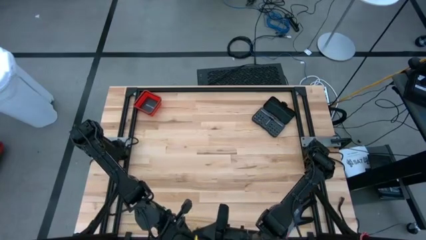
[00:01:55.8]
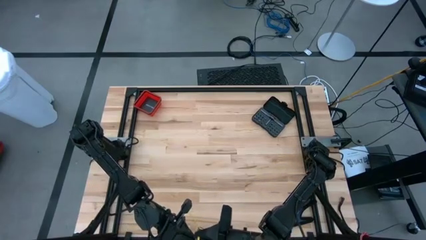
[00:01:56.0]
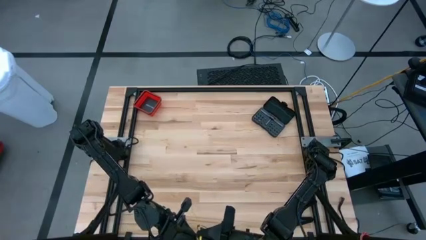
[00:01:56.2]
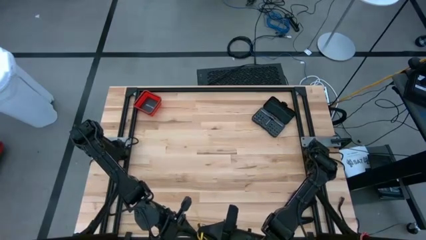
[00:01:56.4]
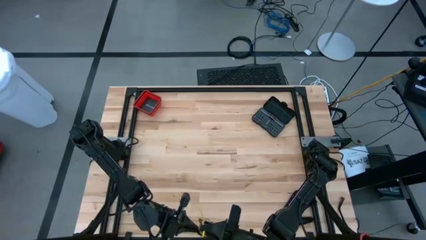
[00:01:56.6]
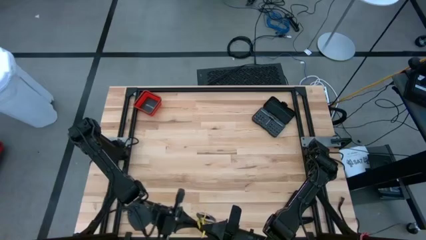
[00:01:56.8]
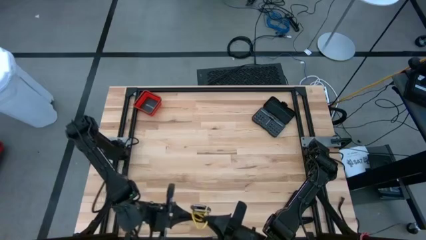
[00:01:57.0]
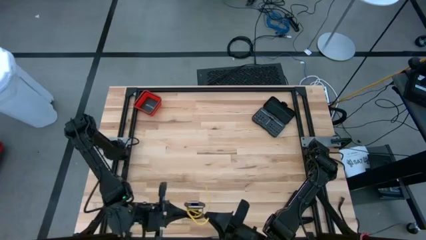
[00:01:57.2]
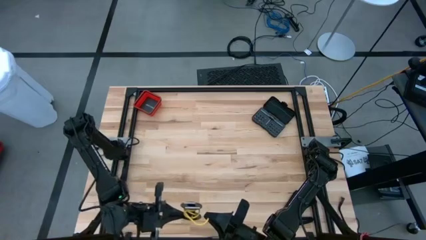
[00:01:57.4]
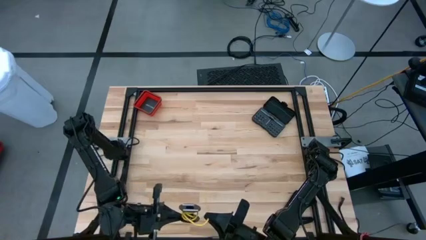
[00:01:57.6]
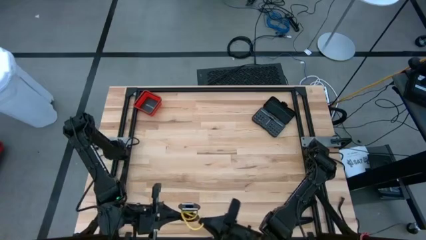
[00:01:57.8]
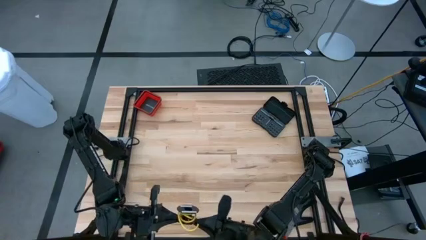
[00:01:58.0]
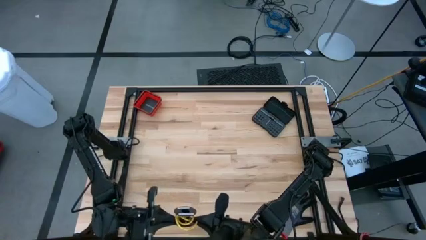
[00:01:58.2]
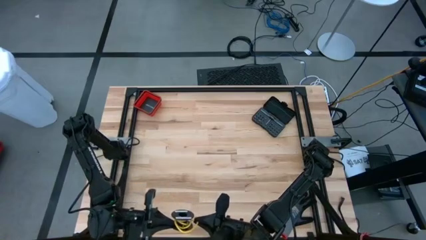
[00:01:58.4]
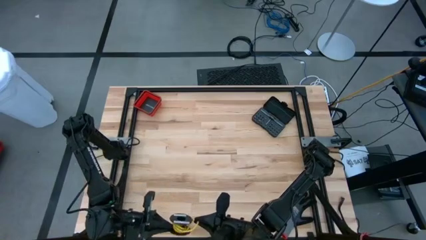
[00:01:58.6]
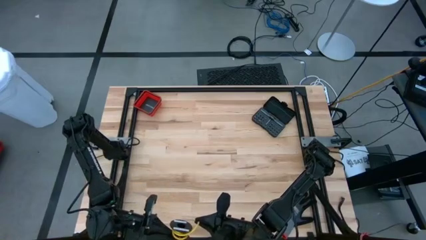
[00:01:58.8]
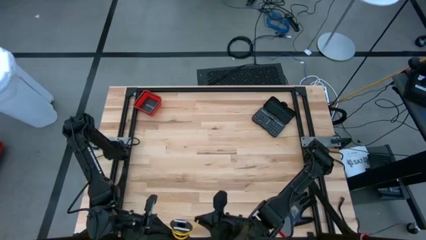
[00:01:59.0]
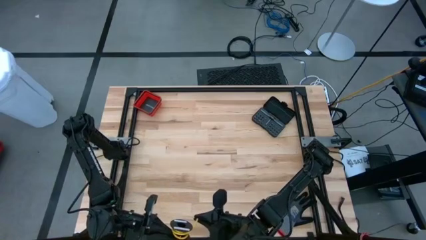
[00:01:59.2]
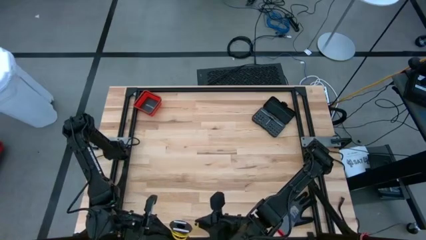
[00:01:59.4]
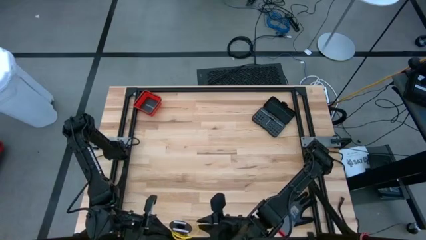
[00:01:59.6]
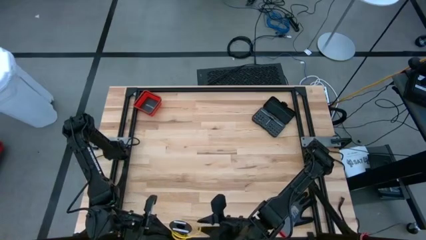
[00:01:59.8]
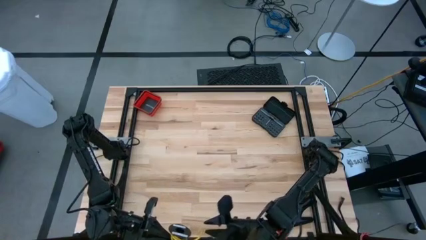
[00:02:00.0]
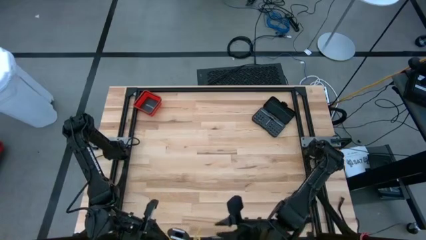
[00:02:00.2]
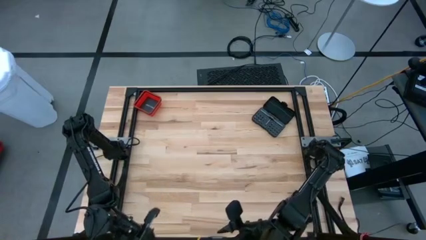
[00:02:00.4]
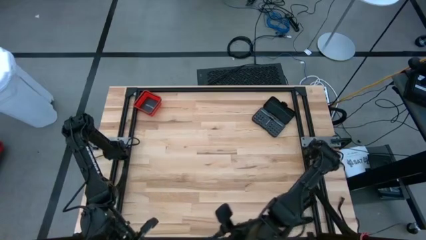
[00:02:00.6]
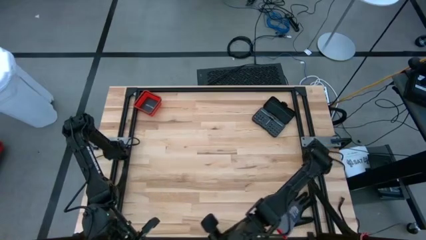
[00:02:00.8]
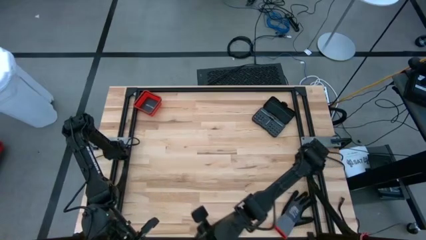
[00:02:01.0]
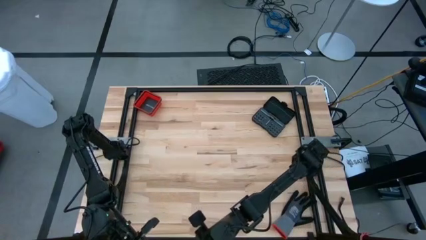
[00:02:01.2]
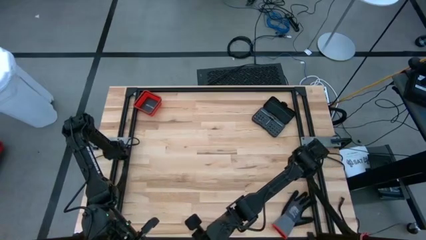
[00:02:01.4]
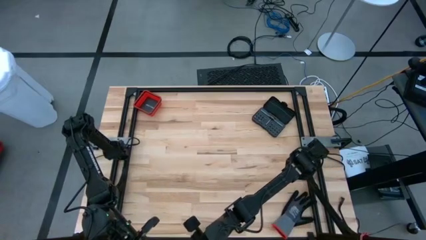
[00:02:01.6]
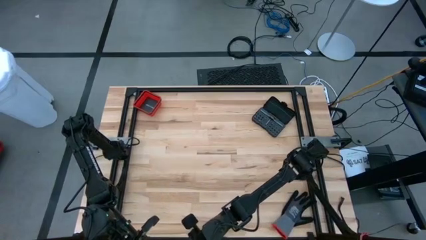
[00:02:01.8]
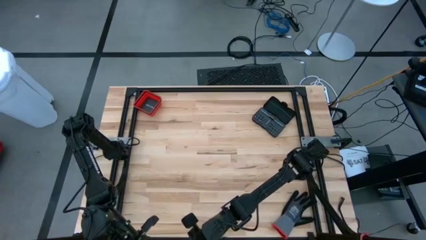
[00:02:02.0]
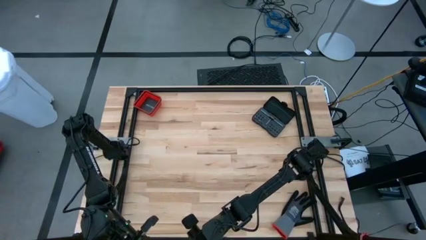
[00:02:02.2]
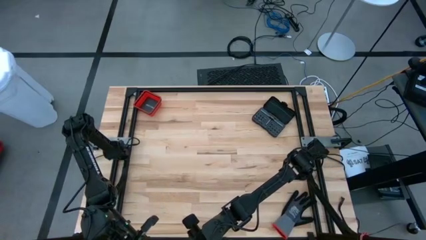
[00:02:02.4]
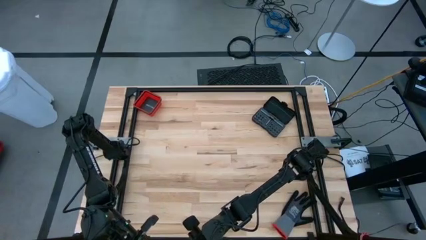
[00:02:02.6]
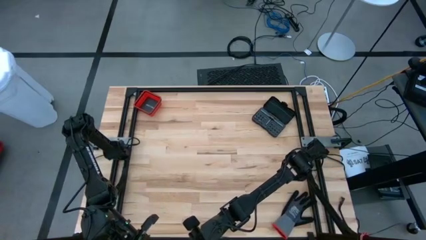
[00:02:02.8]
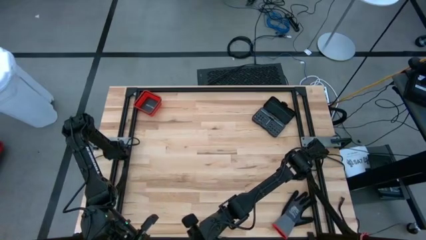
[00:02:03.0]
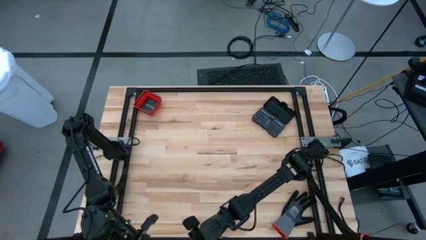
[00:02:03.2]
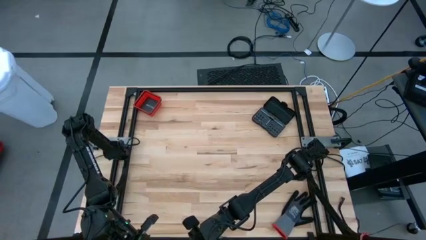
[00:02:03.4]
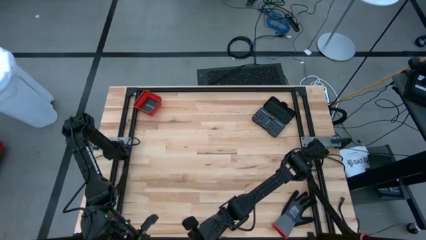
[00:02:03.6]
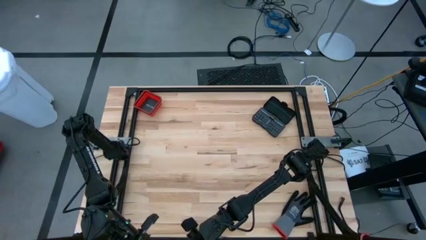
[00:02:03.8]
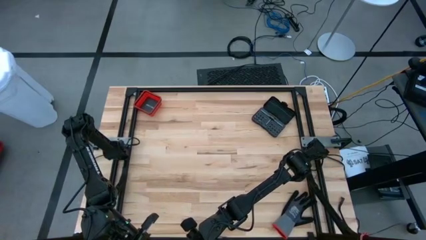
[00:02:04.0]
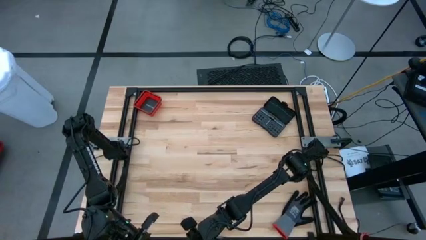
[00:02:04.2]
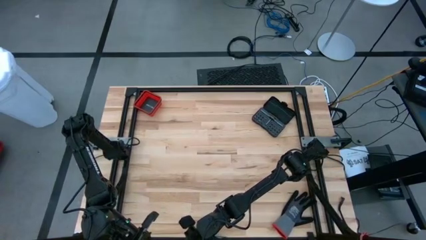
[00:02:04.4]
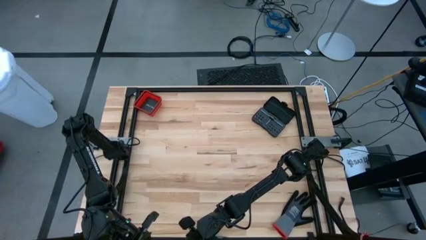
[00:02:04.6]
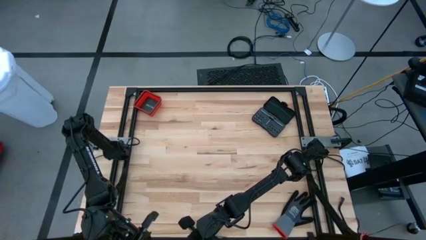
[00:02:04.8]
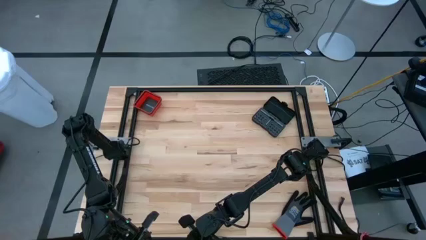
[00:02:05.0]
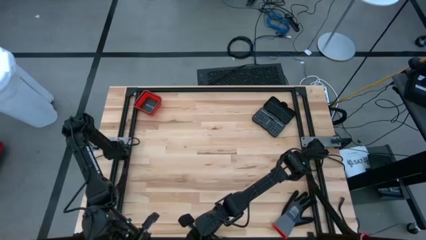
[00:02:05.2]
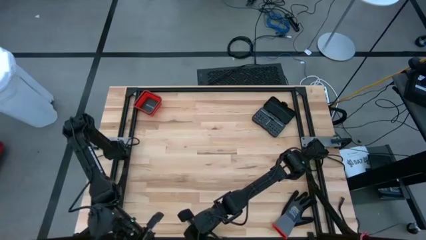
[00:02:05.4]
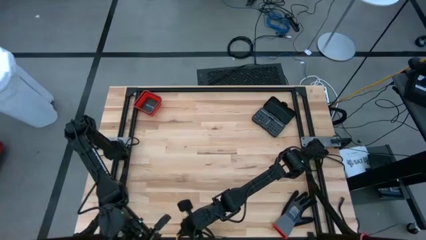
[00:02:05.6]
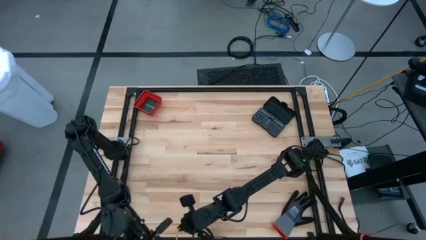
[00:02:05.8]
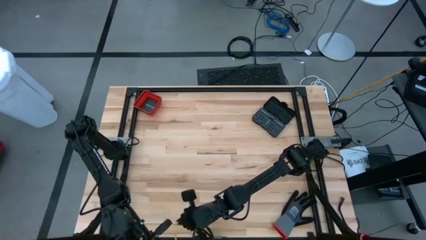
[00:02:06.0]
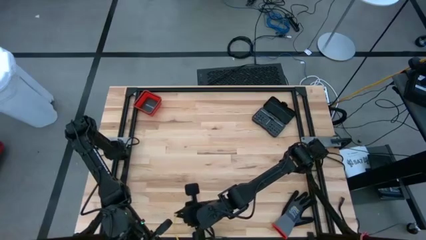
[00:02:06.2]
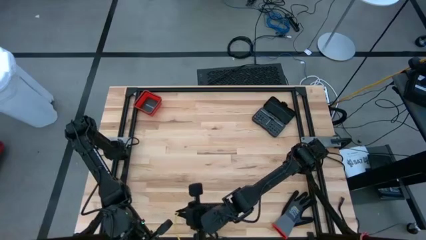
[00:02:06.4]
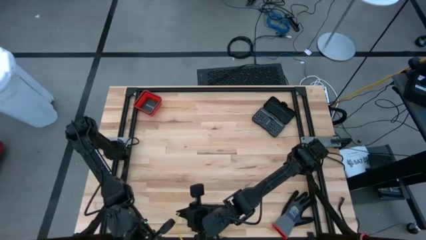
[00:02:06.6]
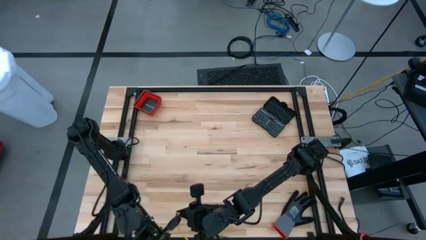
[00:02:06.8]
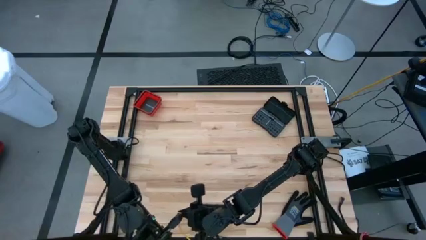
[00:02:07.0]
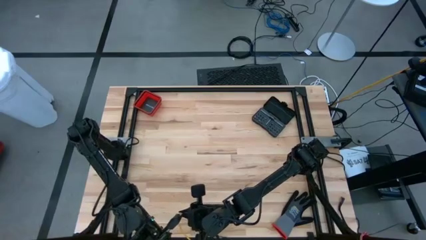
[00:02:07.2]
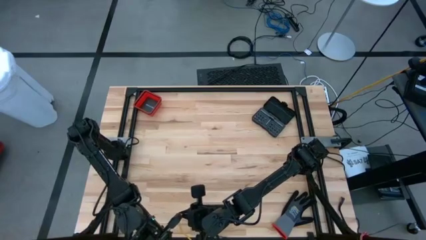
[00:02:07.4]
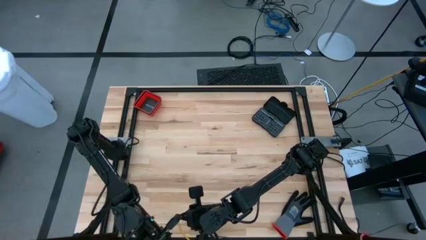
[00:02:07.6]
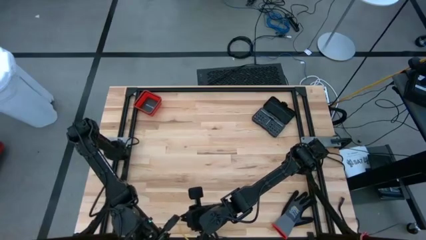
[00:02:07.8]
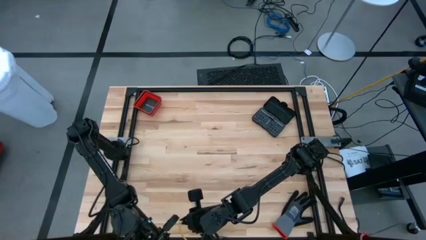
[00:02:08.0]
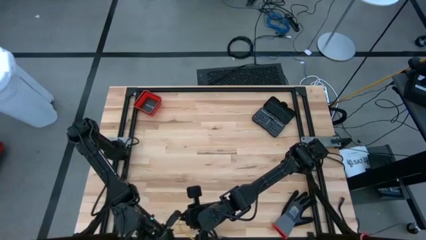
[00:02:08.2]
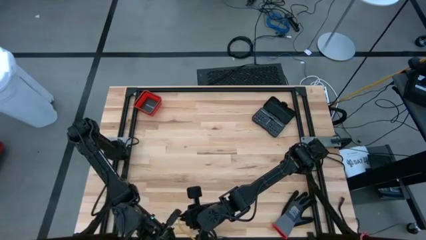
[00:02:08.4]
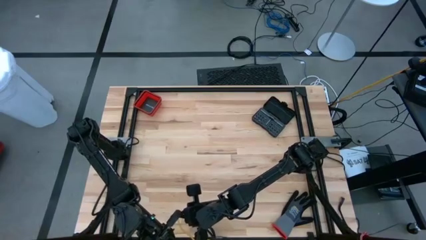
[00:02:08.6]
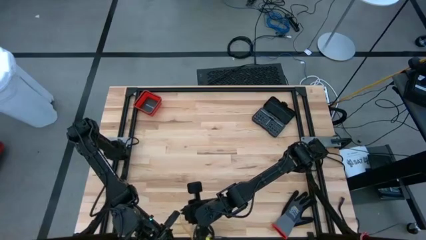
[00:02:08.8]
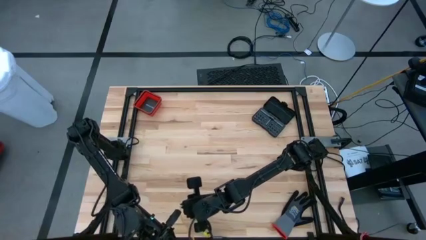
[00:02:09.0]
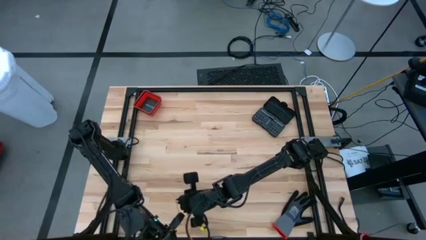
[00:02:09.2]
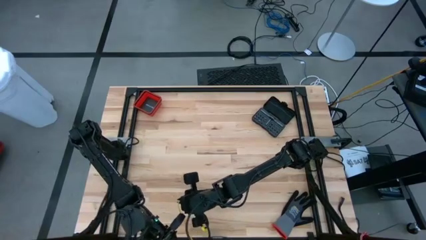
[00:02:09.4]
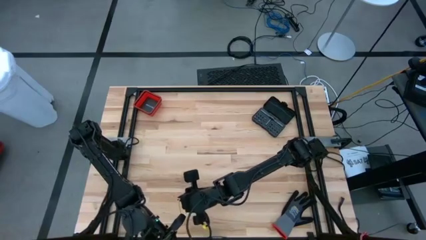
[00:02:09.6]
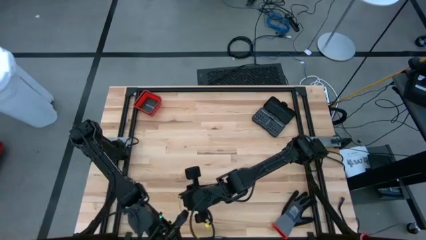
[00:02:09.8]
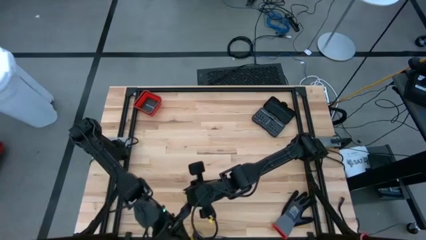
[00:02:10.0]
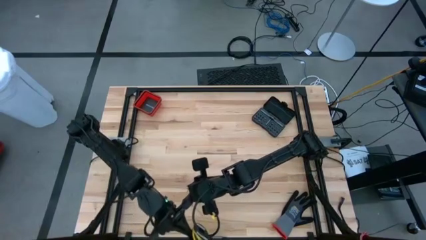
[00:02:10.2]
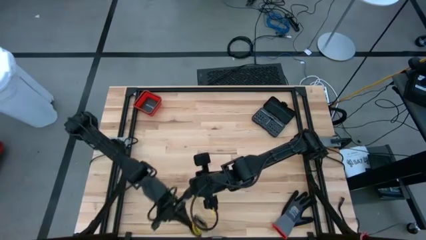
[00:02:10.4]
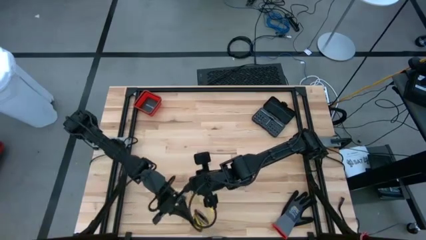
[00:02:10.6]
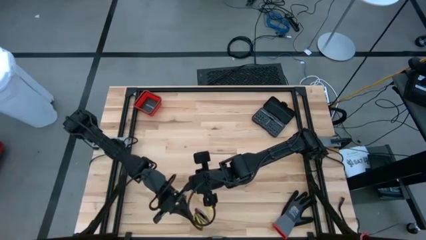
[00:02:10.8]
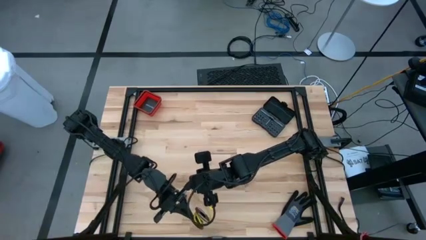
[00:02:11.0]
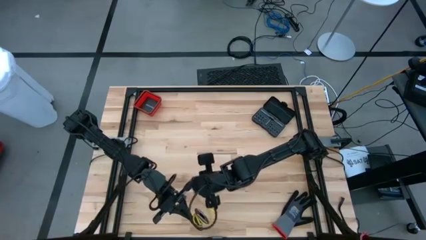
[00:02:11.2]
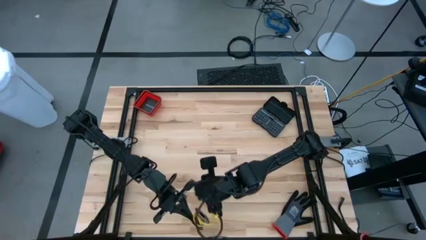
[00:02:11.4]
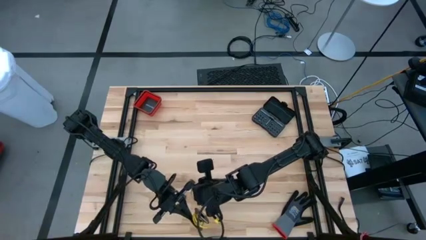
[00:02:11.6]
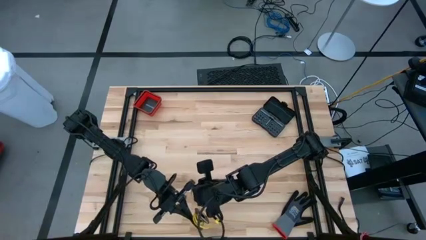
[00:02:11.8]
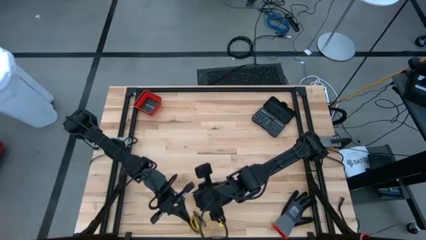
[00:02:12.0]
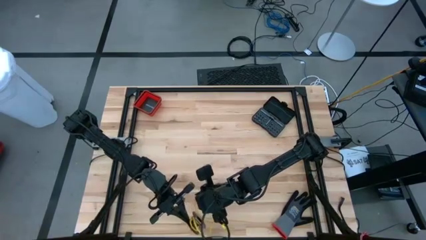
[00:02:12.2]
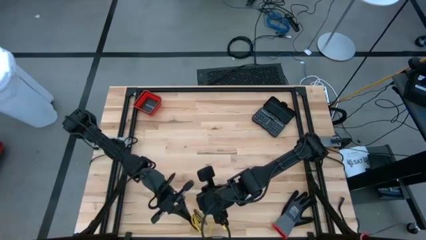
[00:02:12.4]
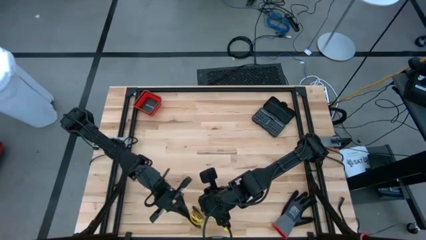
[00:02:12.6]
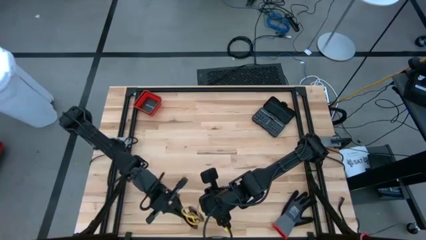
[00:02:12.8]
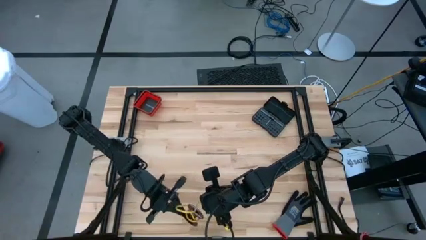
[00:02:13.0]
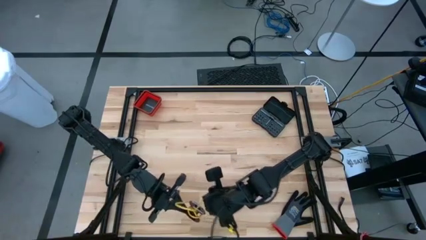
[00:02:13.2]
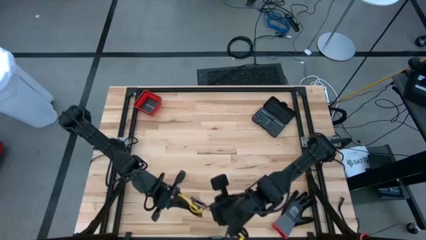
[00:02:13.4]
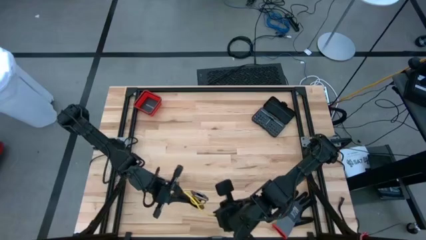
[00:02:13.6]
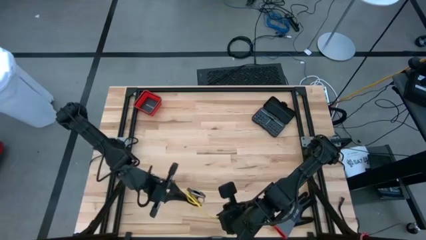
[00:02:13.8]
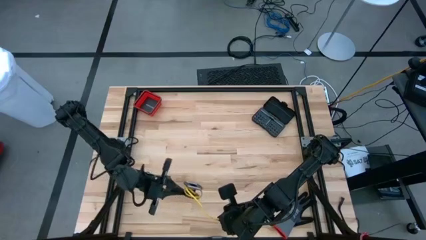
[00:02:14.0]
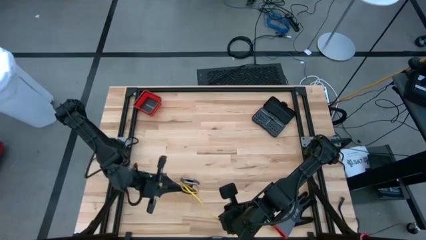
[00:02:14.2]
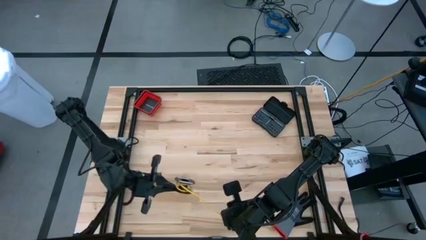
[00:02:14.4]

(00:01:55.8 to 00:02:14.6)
Task: Coil cords
Coil the yellow cable wire onto the spool
